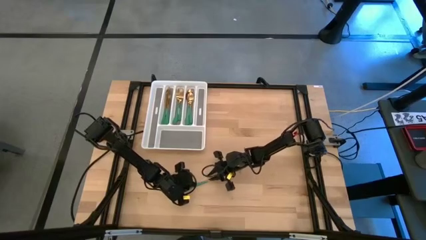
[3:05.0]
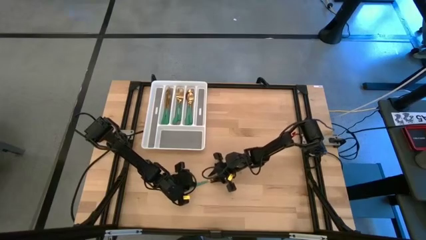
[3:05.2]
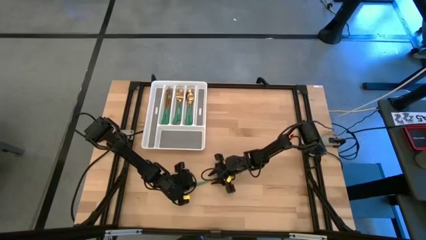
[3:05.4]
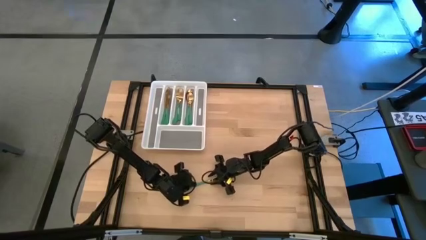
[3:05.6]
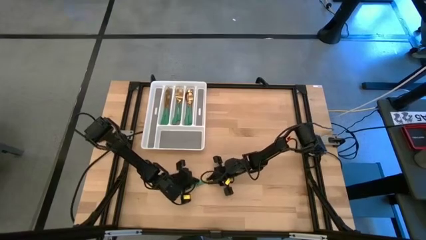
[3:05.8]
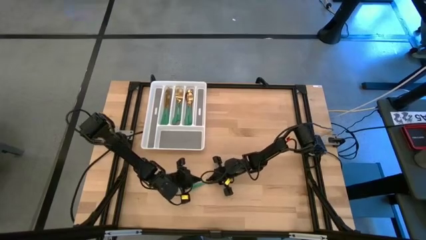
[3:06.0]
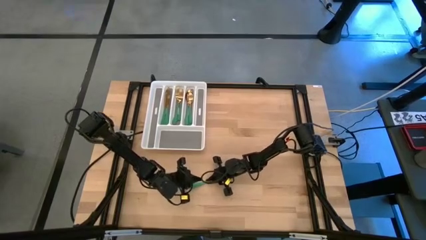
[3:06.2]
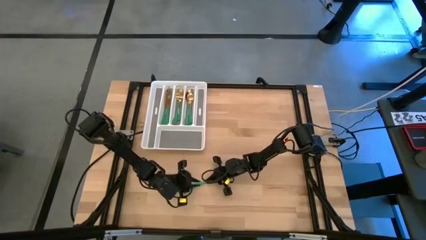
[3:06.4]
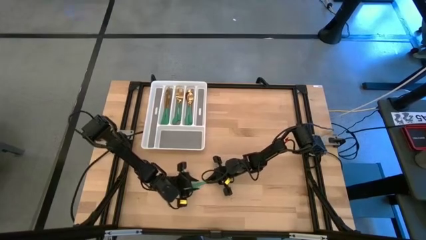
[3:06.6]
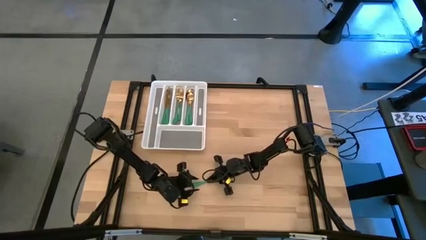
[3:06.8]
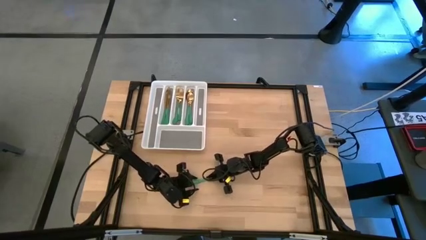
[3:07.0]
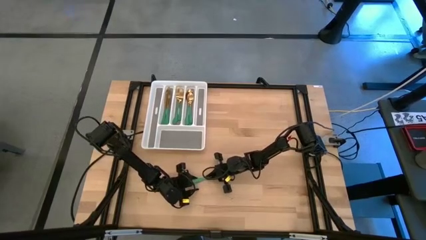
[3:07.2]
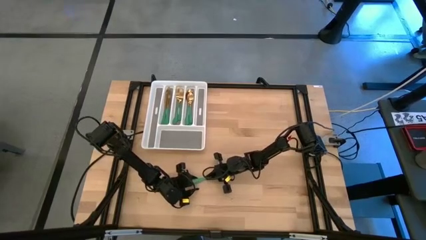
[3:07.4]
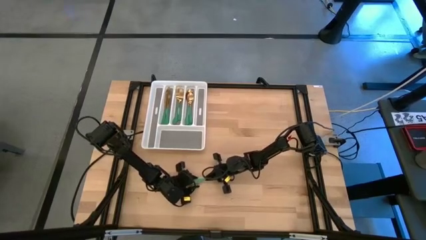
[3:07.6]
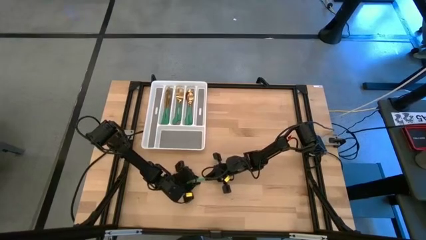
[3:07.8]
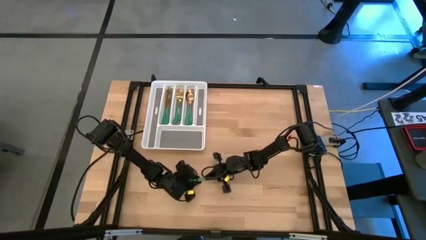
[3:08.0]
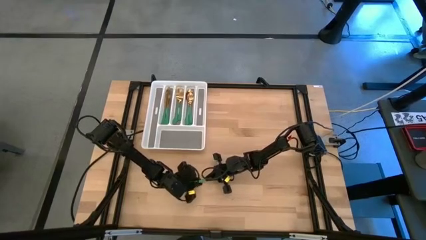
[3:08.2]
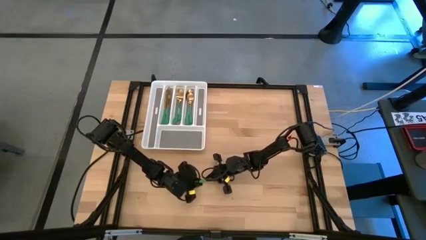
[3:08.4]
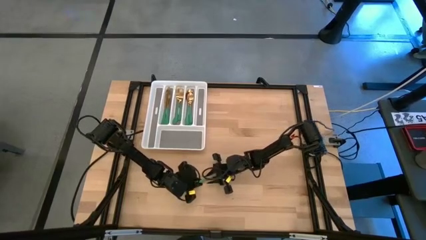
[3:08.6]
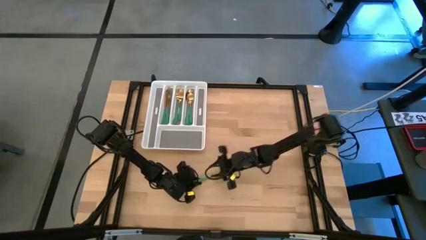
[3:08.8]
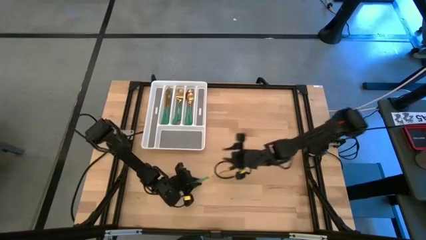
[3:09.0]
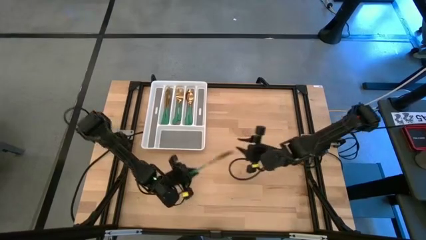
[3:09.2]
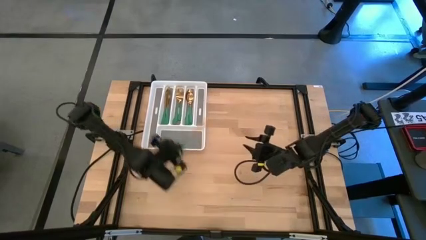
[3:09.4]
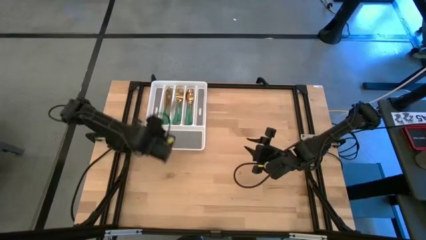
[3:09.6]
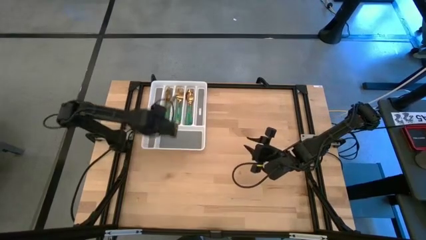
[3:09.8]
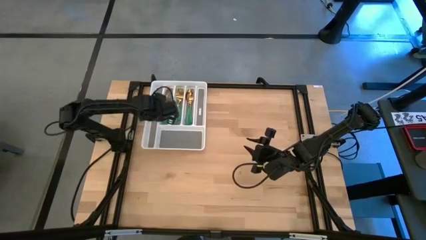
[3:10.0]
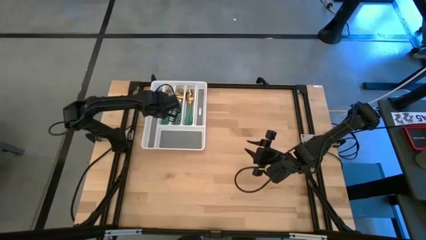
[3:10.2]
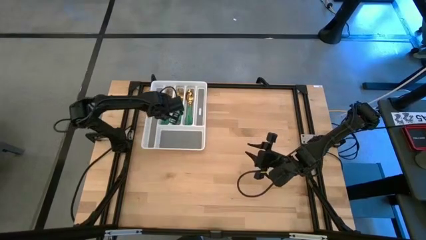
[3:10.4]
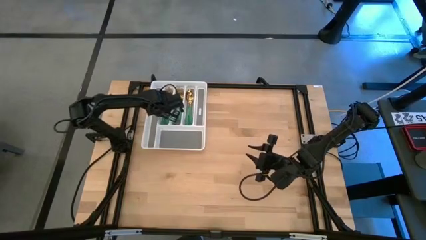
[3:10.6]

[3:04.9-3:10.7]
Task: Sort silverware
Put the green knife into the white cutlery tray

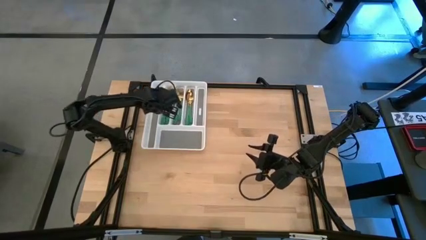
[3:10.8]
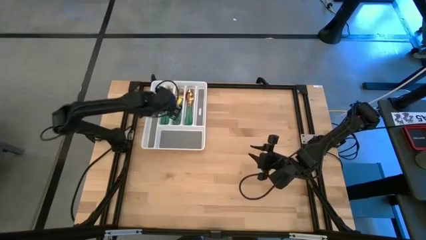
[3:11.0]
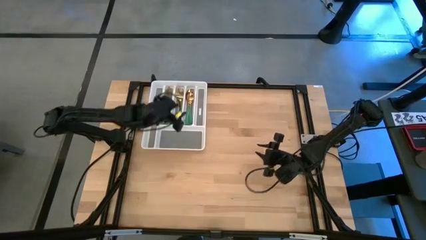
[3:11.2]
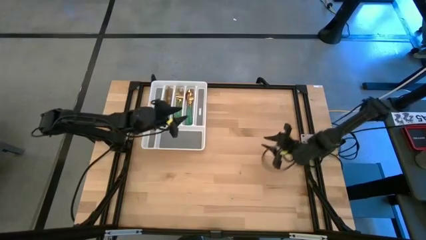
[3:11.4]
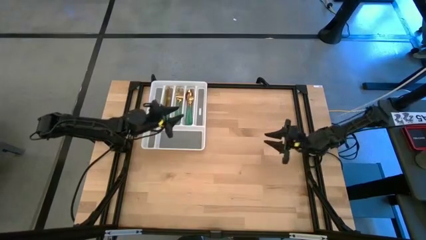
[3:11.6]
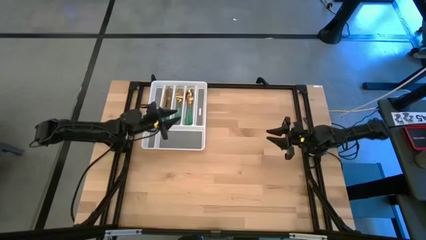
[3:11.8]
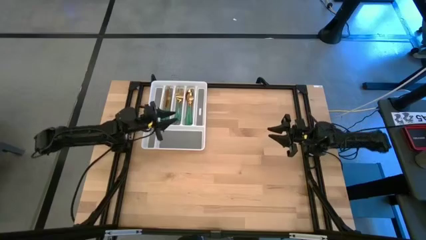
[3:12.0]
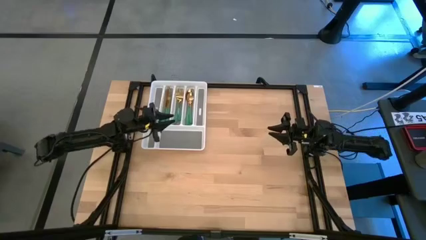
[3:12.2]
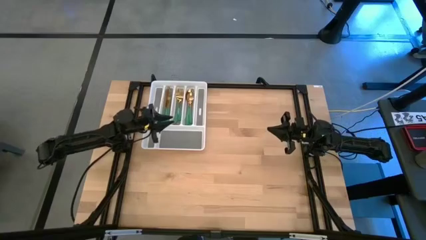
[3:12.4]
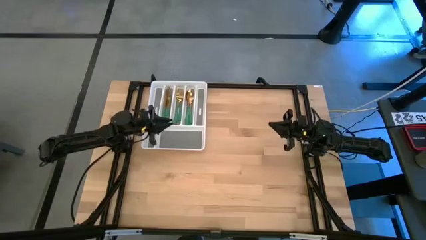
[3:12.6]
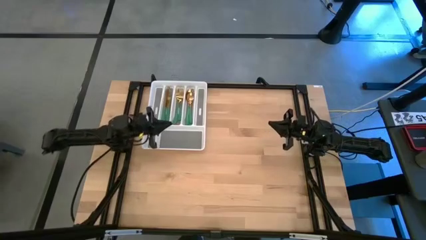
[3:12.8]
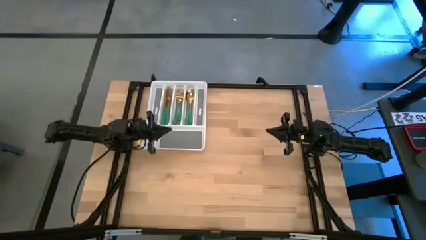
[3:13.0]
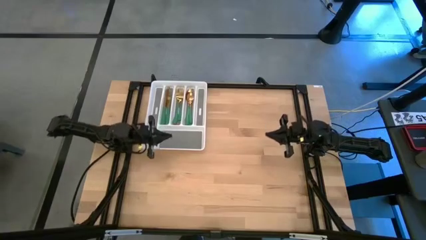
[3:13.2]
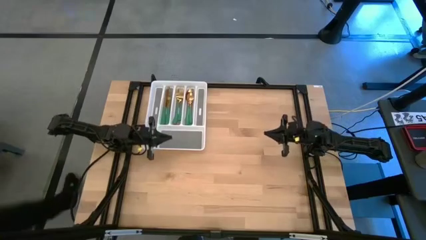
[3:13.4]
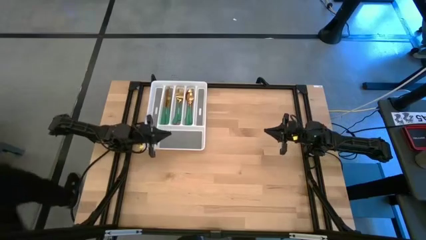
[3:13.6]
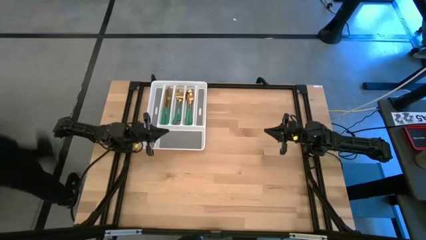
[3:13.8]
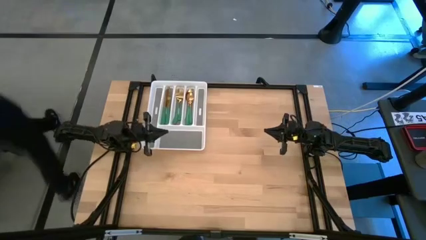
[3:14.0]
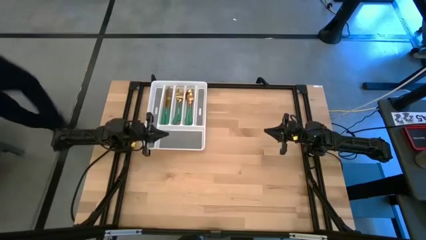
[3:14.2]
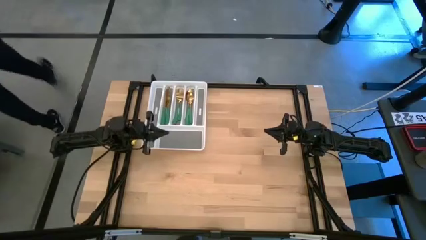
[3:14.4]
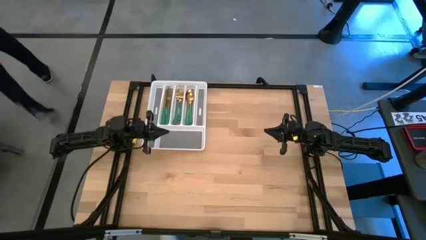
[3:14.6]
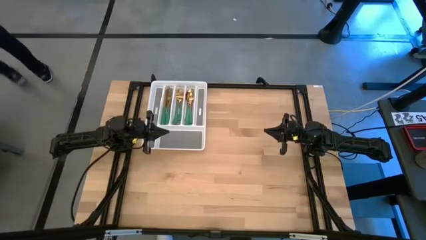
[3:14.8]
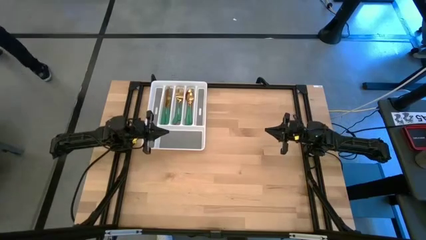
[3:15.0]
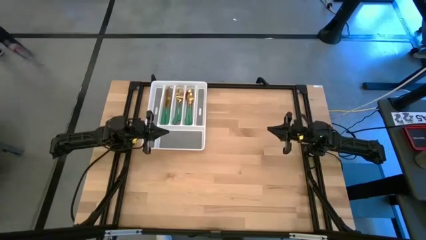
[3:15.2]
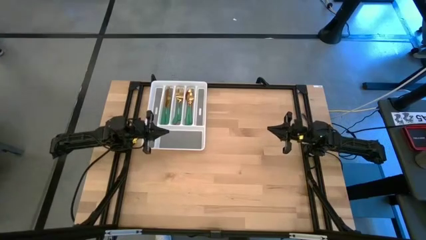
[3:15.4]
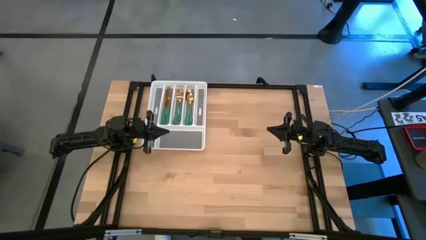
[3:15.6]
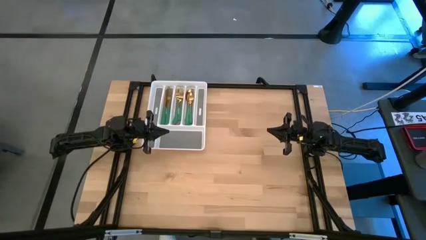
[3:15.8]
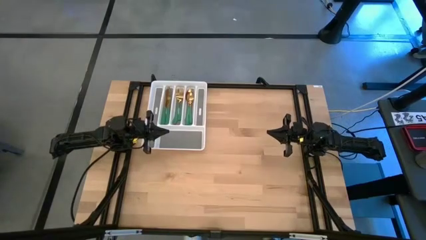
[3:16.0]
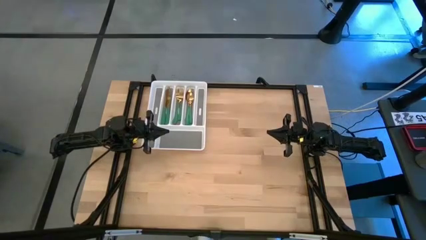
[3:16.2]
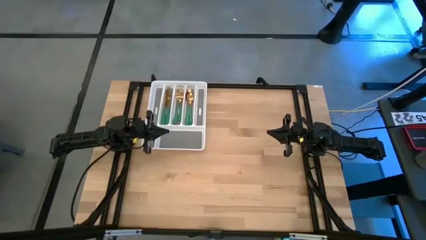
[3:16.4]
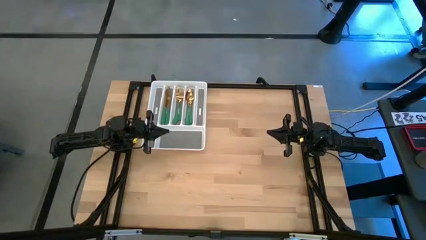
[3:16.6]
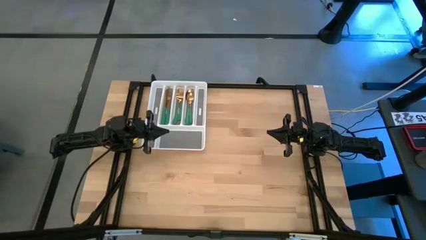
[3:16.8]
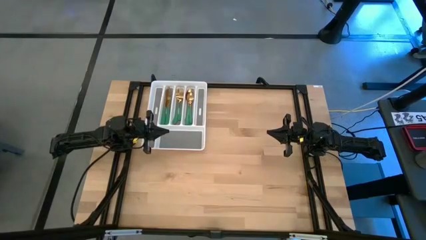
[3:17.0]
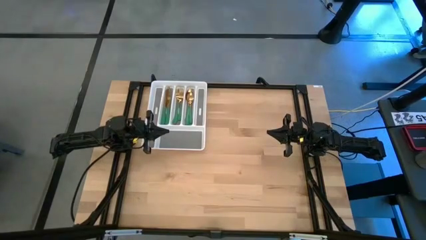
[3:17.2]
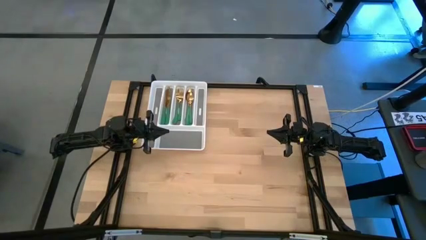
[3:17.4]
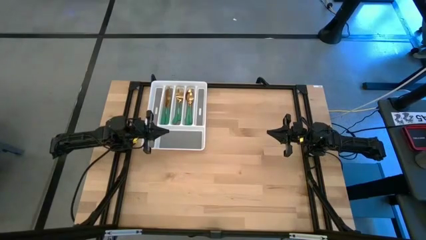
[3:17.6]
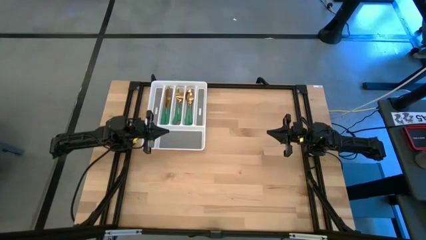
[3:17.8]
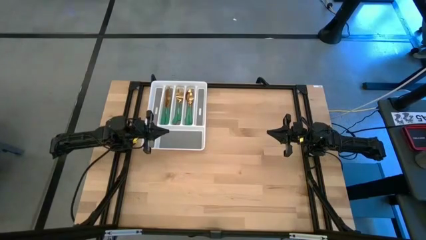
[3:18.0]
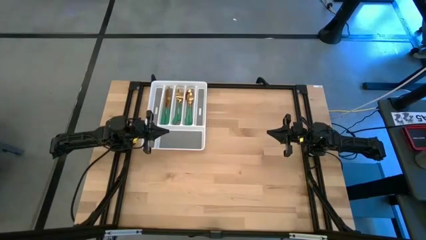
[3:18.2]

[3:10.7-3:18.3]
Return to Home Position
